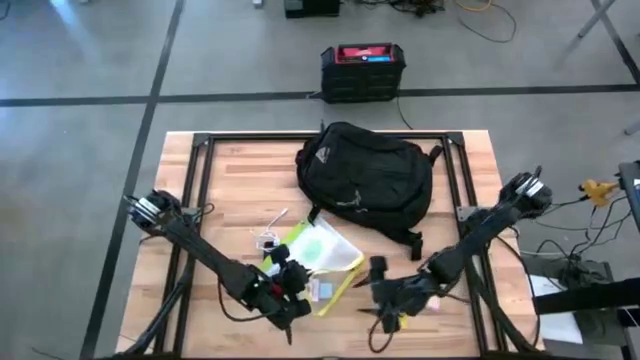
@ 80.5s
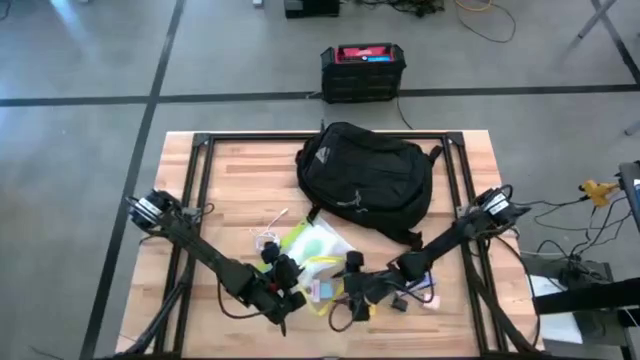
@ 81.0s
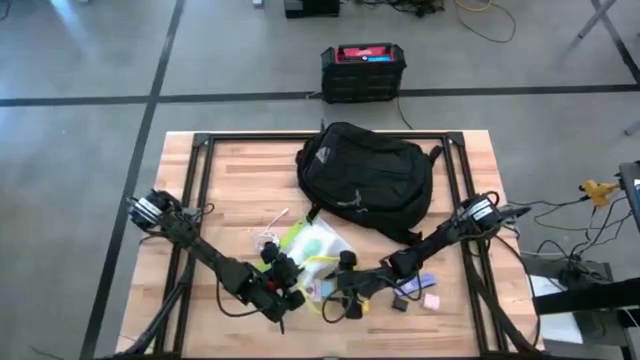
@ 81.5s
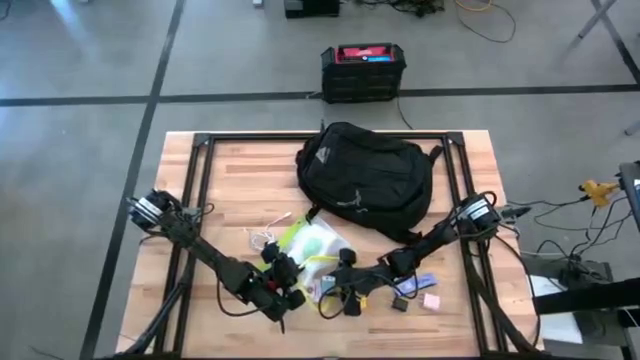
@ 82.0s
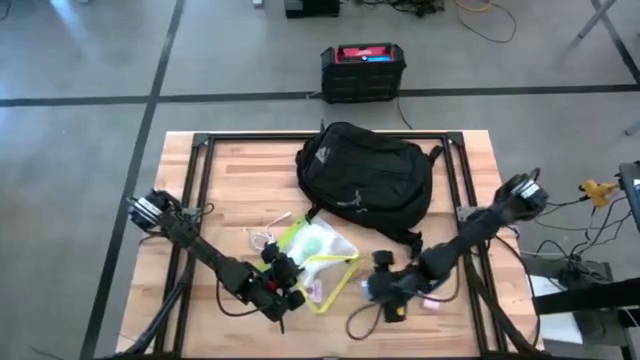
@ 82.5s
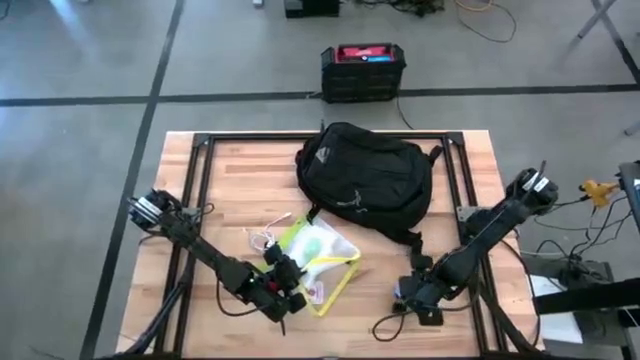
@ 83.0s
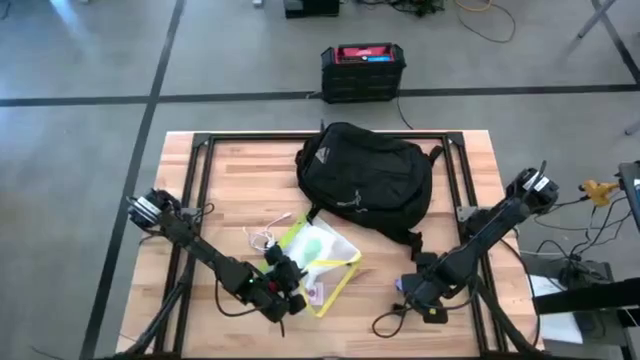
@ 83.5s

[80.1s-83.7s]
Task: Unpack backpack
Remove the blue charger adapter from the yellow green zip bag

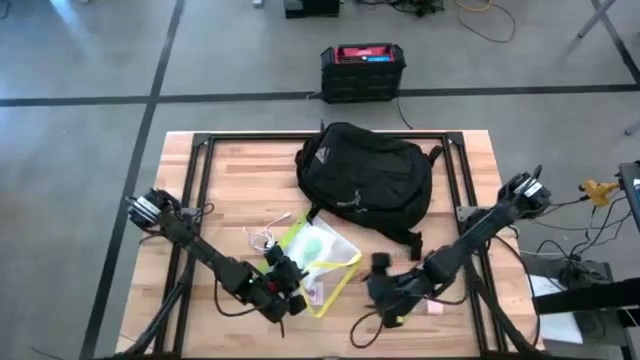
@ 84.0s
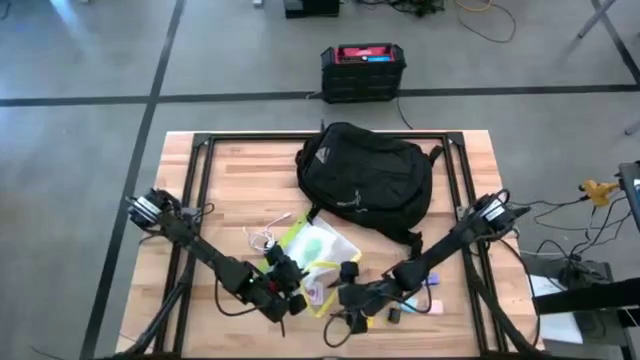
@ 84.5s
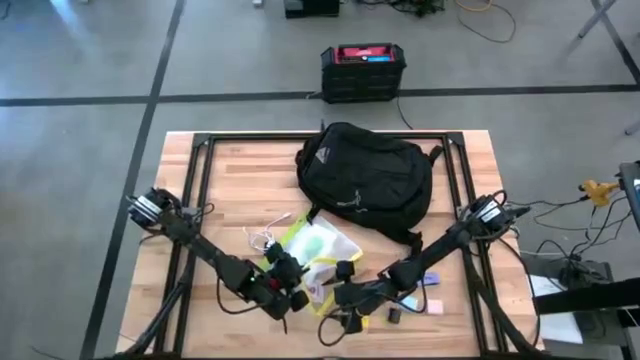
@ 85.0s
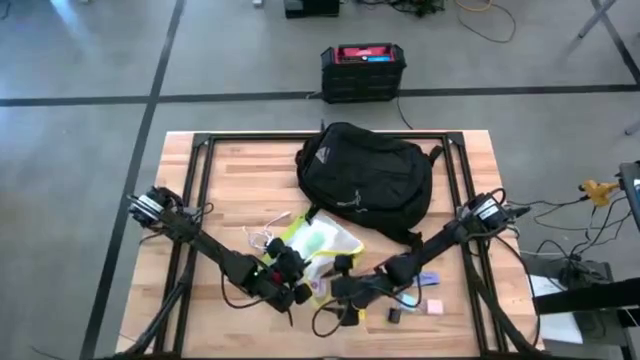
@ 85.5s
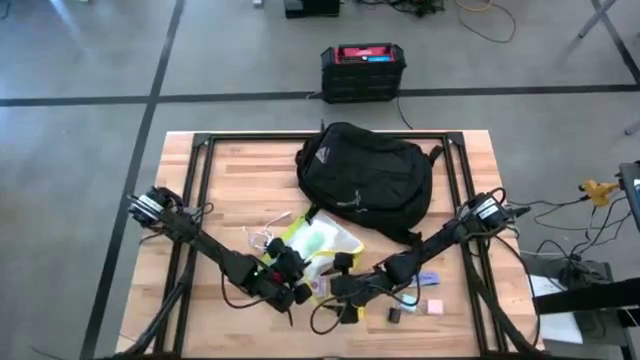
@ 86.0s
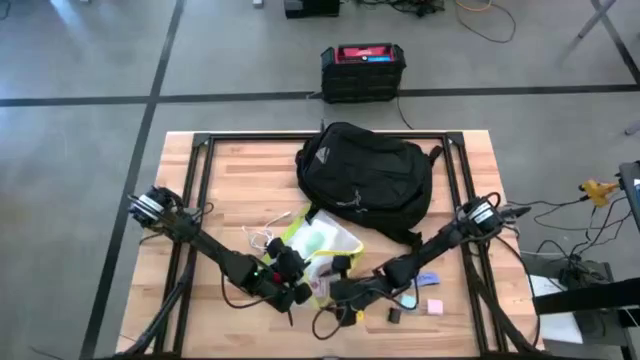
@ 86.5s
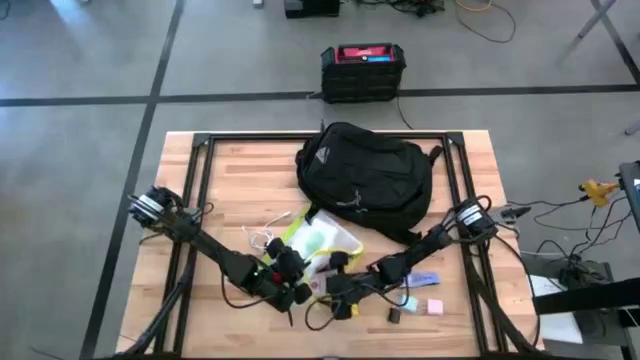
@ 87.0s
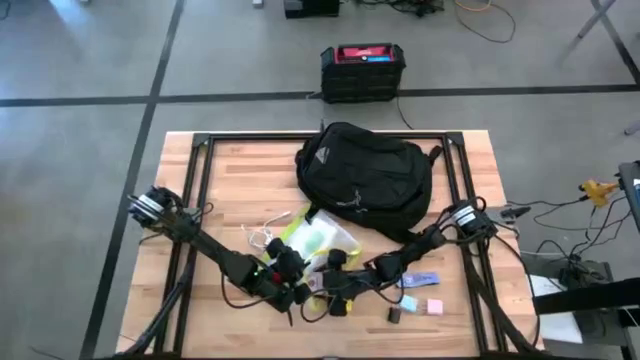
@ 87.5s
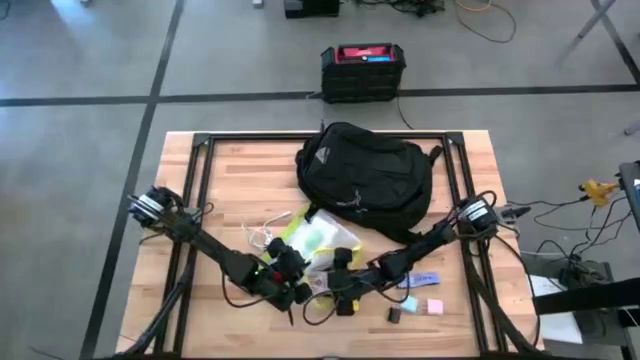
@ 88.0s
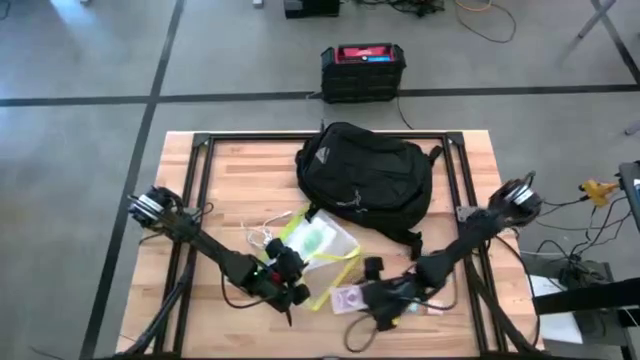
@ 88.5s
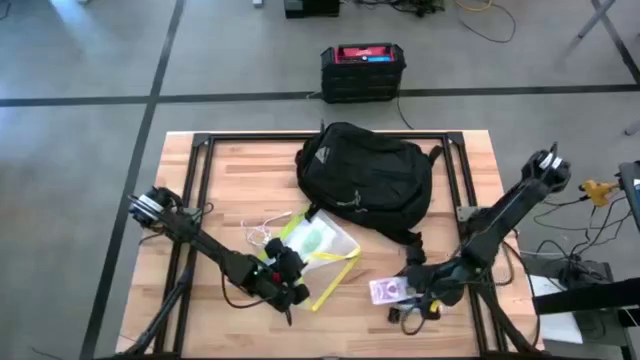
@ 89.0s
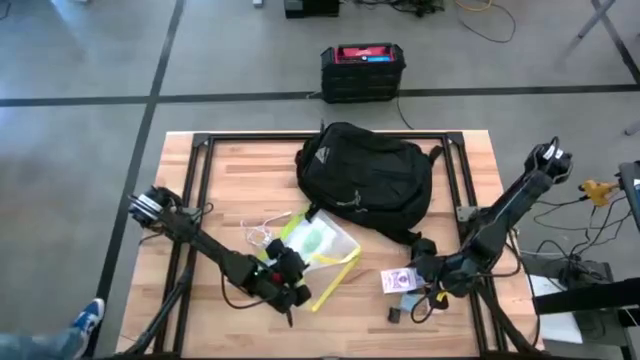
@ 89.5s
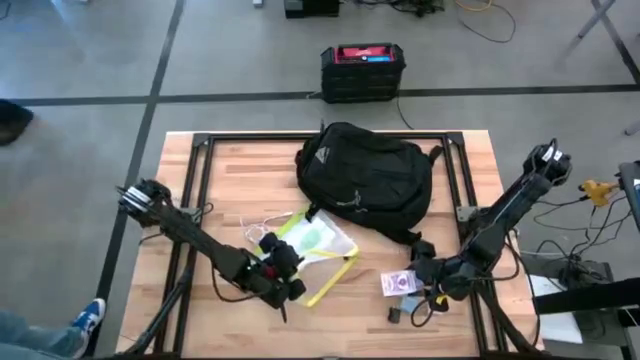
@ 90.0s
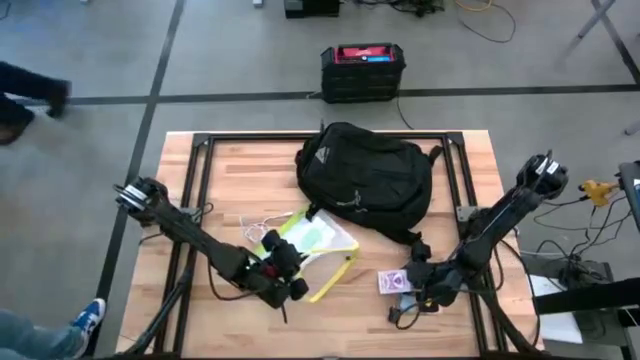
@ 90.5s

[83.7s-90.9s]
Remove the purple game cards from the yellow green zip bag

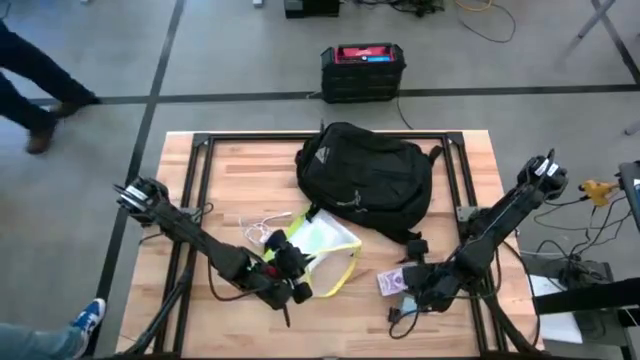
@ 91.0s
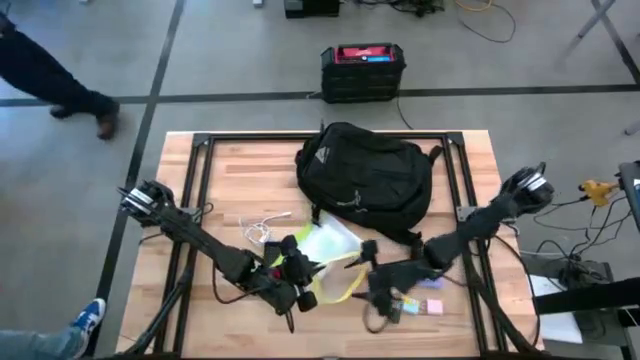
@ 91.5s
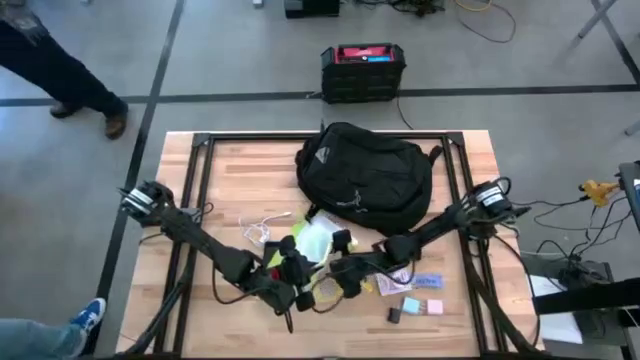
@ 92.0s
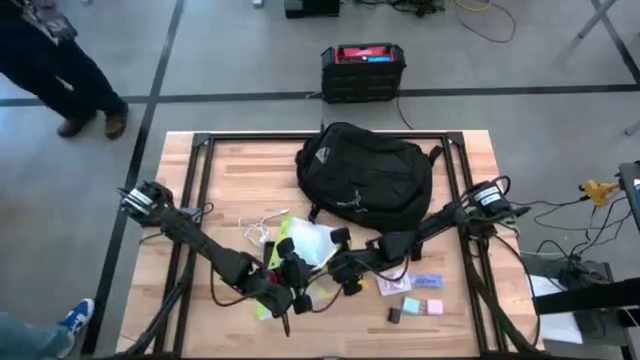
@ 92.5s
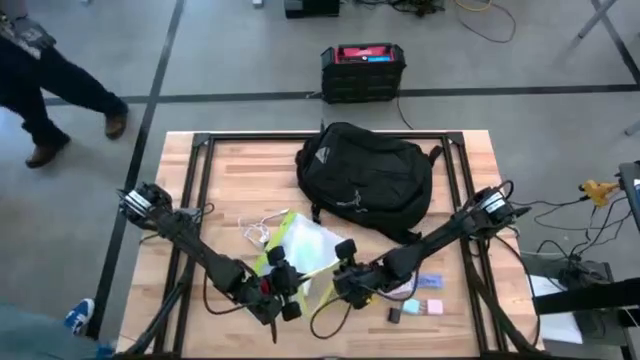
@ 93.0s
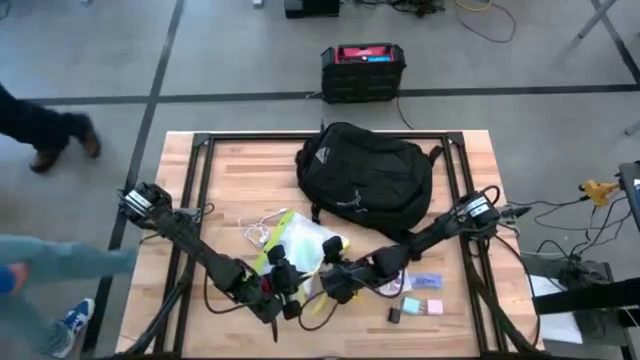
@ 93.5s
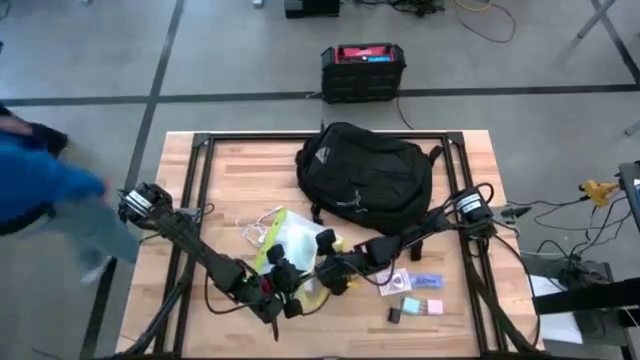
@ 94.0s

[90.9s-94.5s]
Remove the packed green earphone from the yellow green zip bag

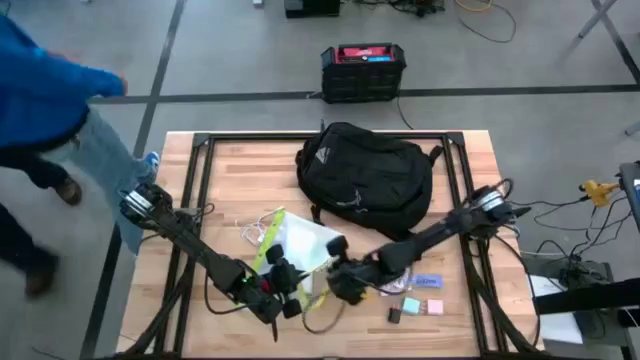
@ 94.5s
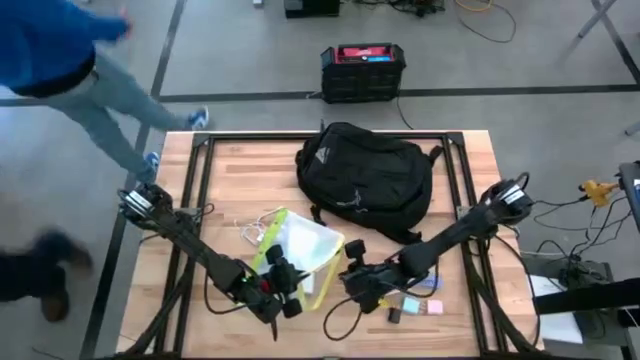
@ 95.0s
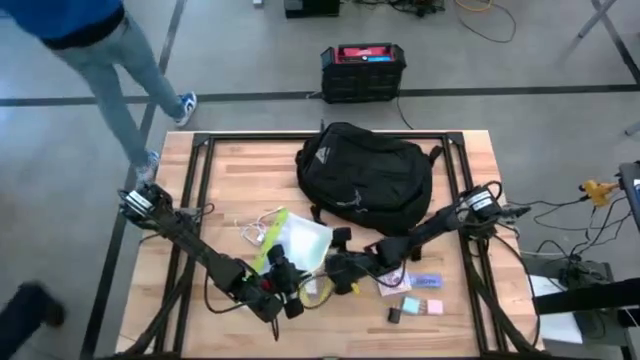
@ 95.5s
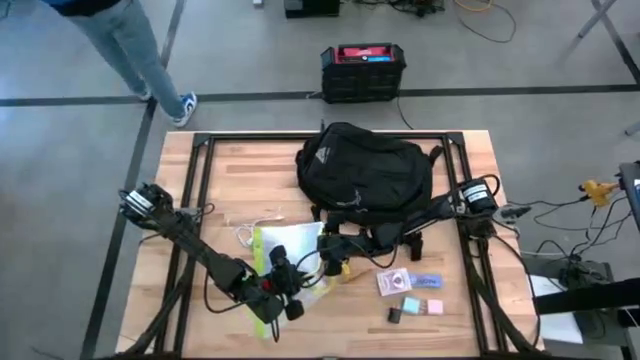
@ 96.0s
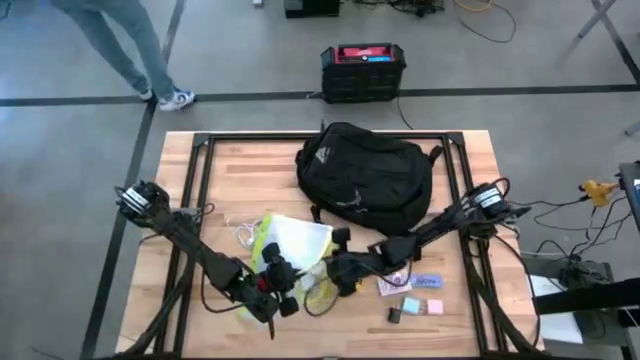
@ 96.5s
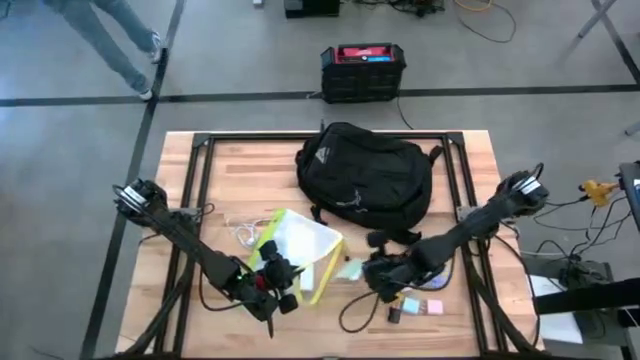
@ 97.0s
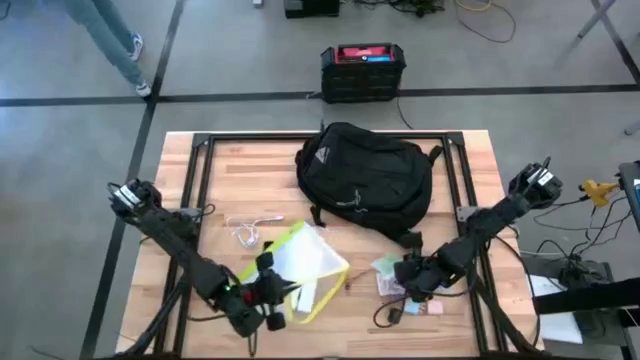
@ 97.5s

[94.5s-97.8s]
Remove the packed green earphone from the yellow green zip bag

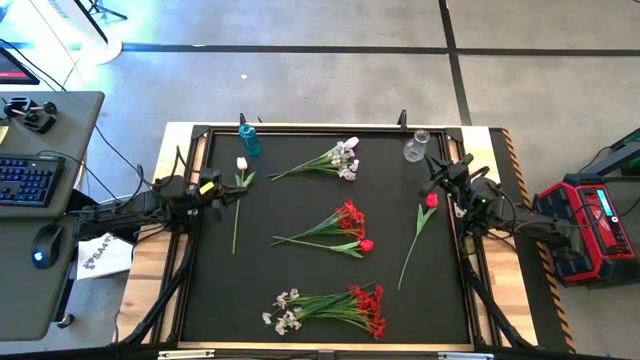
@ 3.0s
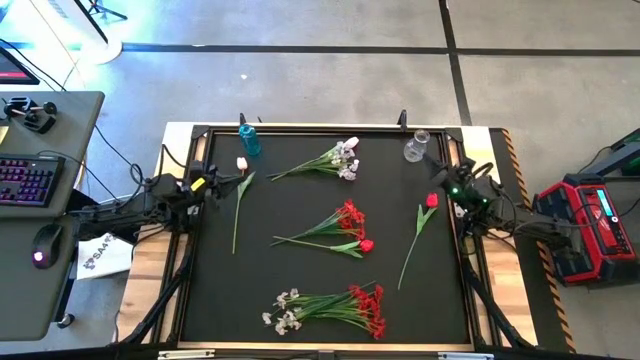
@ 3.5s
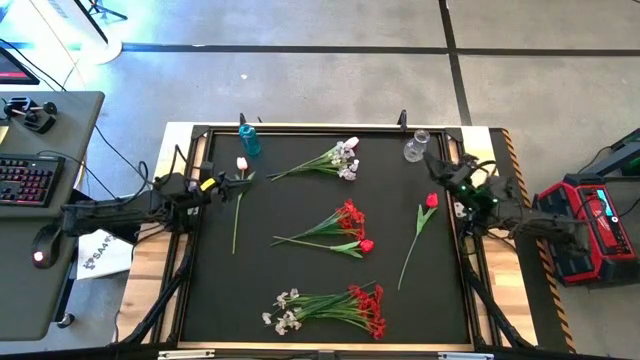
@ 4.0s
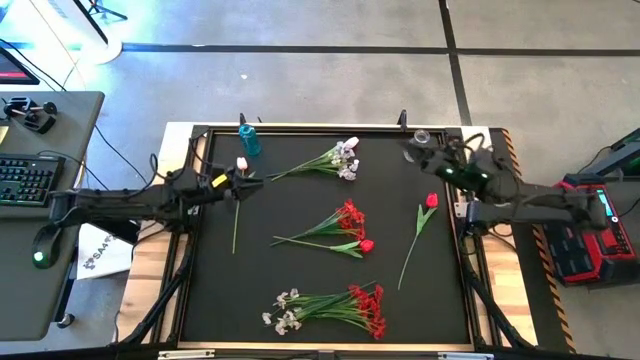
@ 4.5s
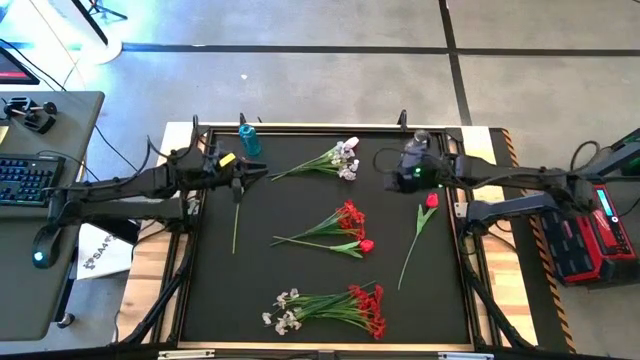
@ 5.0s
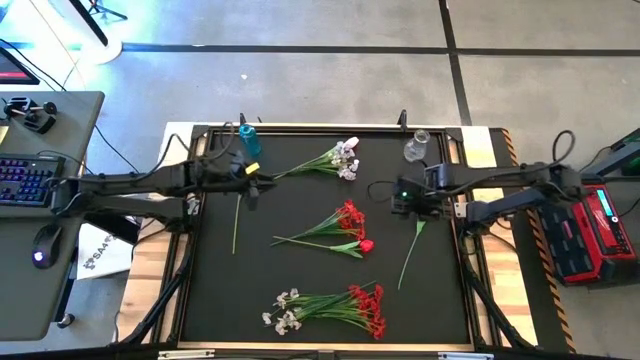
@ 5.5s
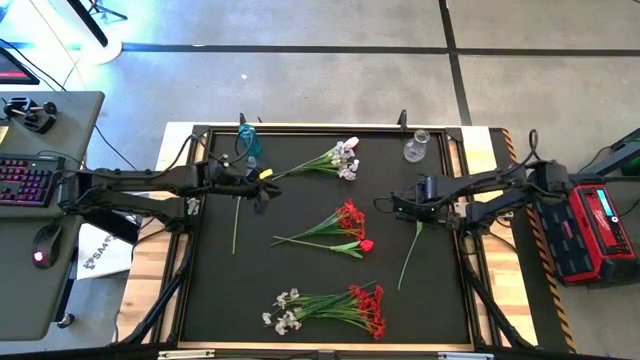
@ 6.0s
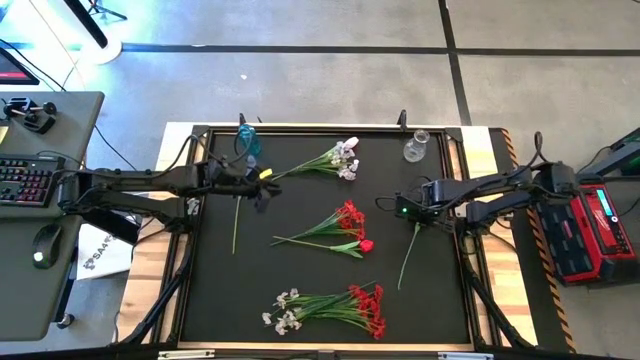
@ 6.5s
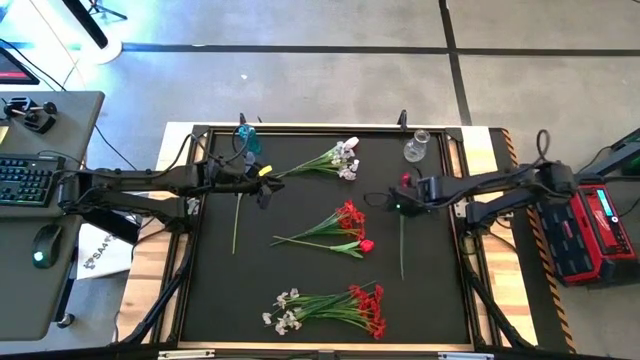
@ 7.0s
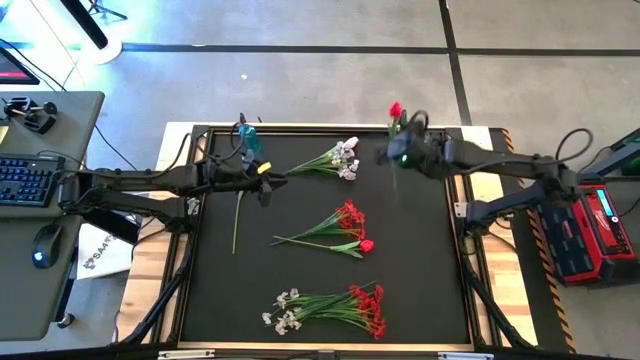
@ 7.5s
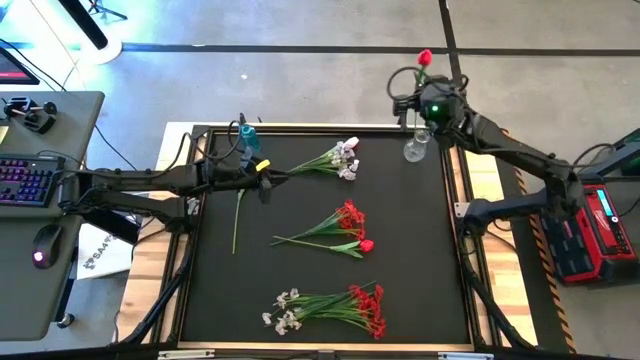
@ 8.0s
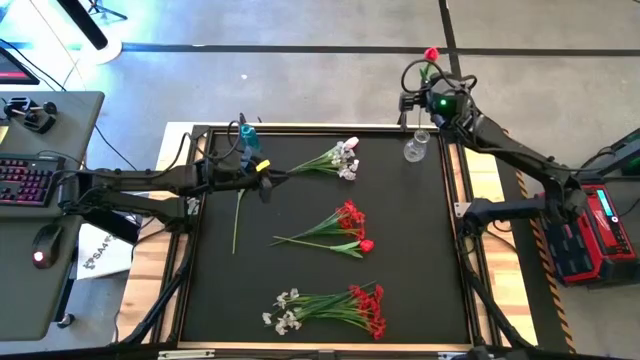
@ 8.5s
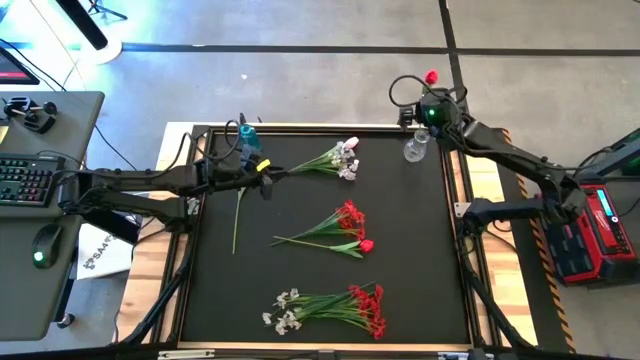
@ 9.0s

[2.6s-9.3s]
Task: Sort flowers into vase by color
Put the top red tulip into the transparent vase
